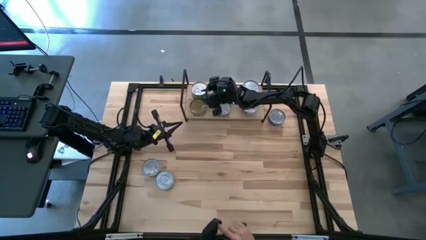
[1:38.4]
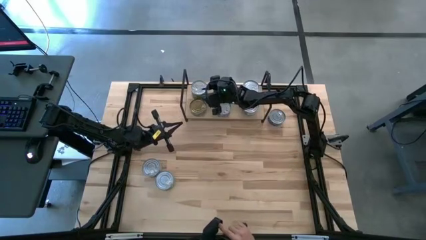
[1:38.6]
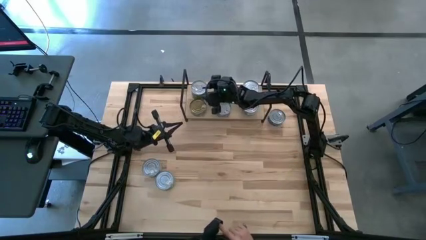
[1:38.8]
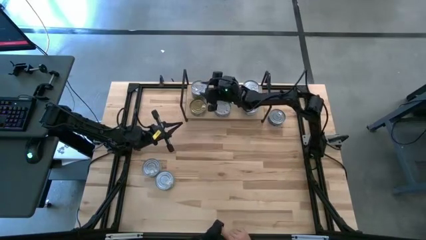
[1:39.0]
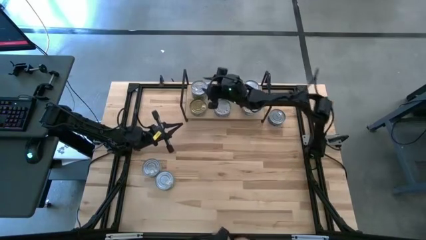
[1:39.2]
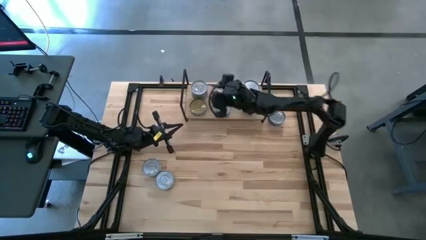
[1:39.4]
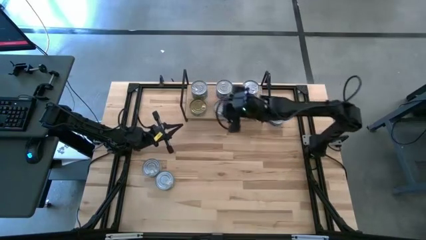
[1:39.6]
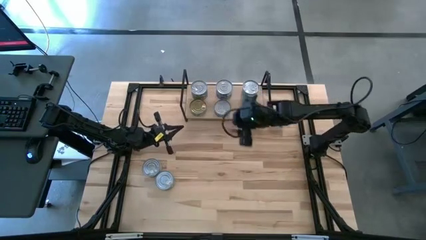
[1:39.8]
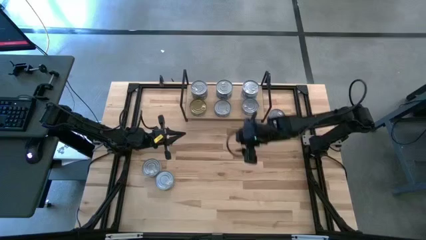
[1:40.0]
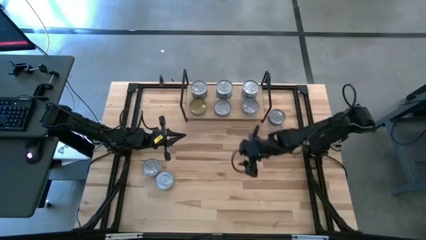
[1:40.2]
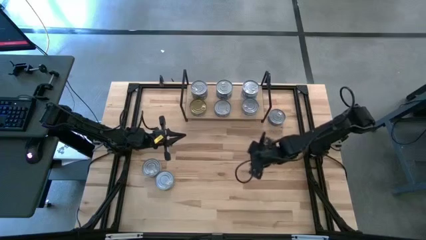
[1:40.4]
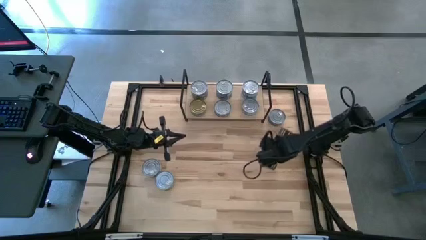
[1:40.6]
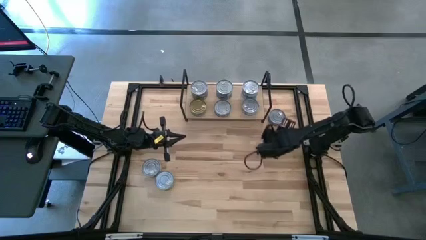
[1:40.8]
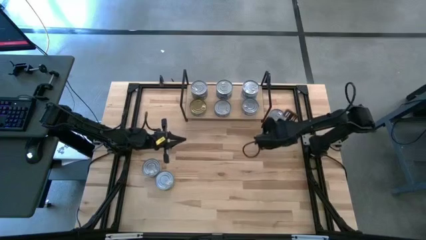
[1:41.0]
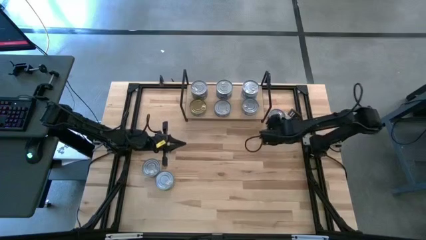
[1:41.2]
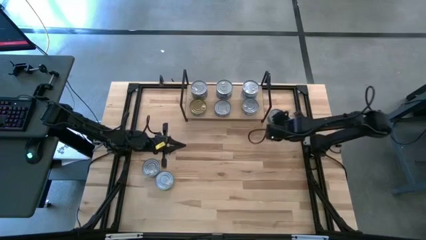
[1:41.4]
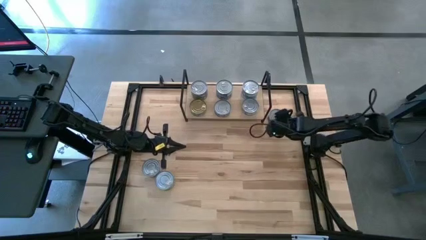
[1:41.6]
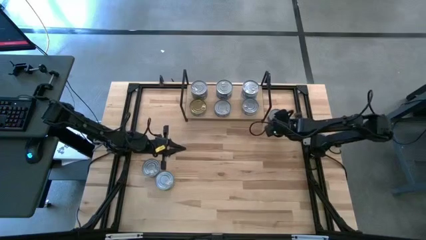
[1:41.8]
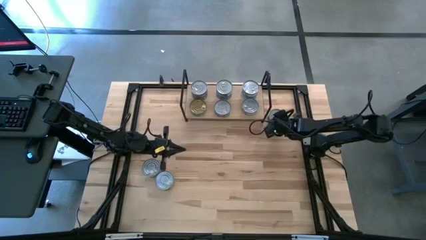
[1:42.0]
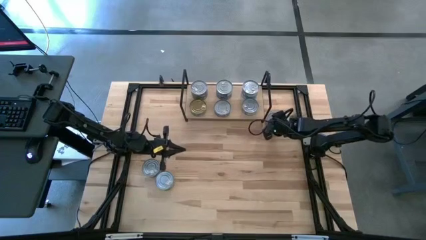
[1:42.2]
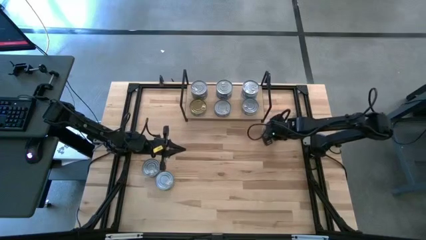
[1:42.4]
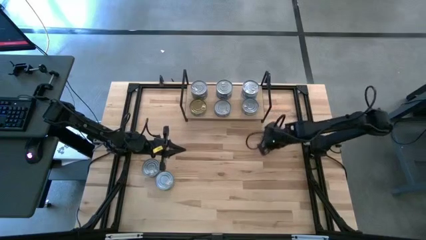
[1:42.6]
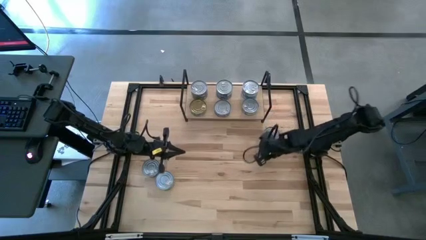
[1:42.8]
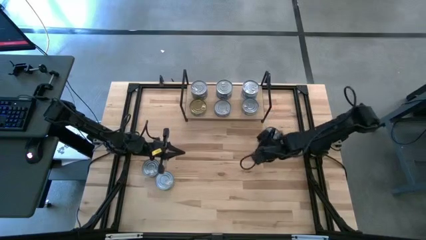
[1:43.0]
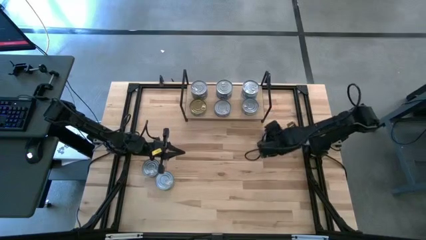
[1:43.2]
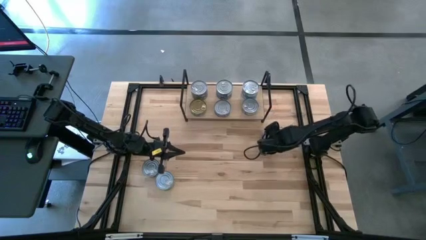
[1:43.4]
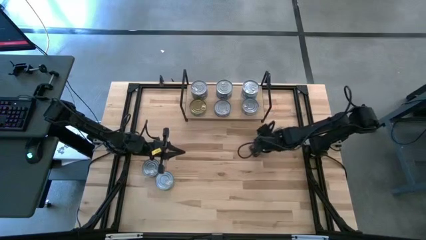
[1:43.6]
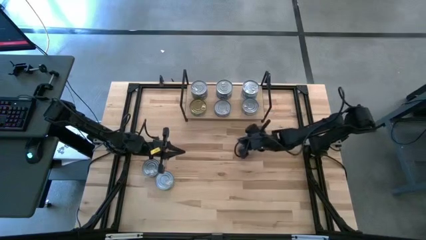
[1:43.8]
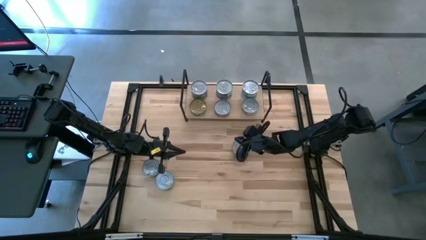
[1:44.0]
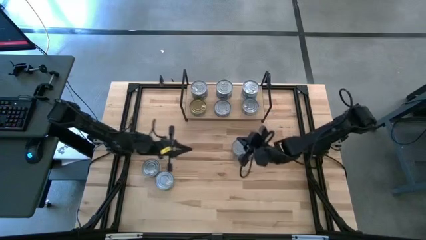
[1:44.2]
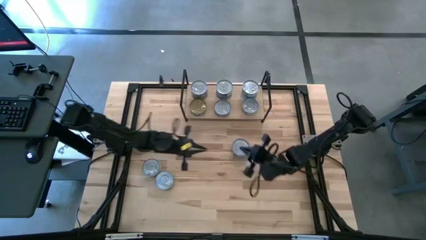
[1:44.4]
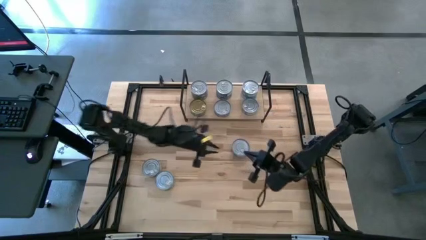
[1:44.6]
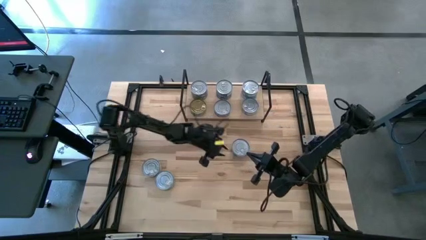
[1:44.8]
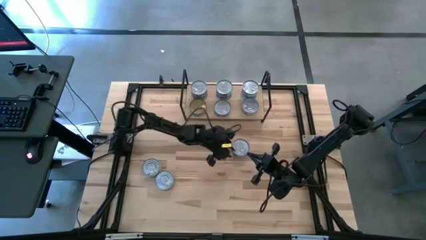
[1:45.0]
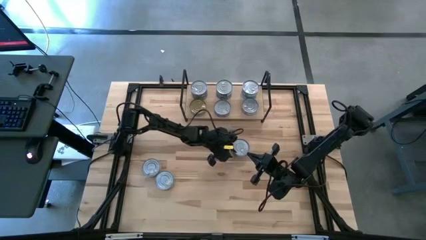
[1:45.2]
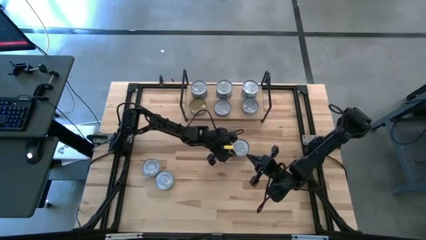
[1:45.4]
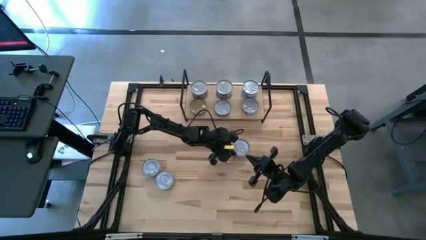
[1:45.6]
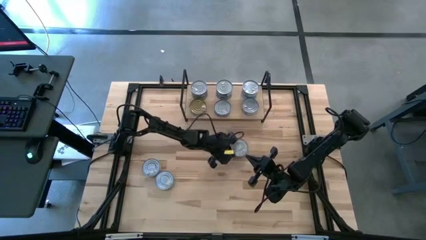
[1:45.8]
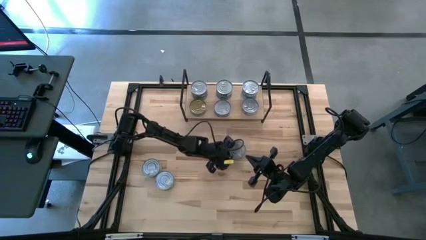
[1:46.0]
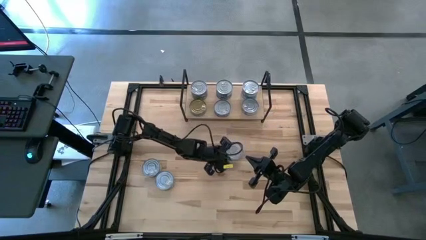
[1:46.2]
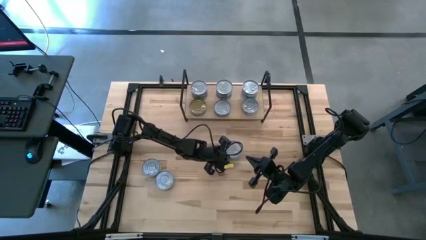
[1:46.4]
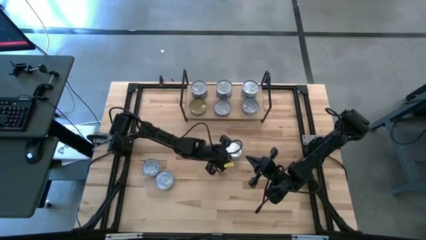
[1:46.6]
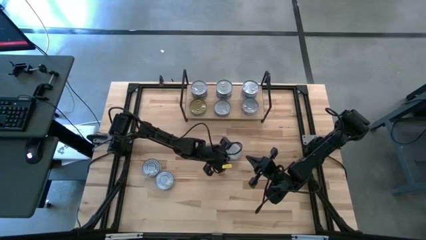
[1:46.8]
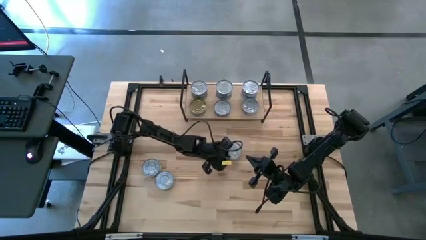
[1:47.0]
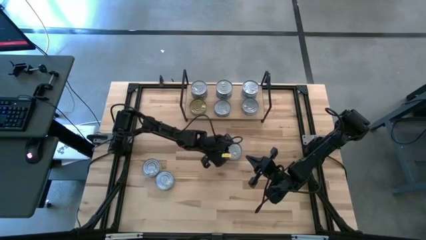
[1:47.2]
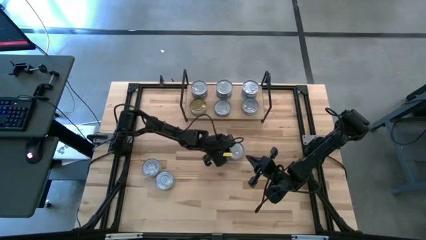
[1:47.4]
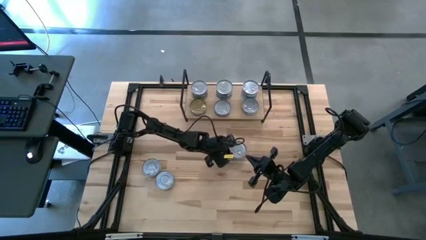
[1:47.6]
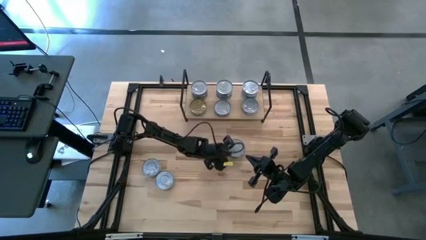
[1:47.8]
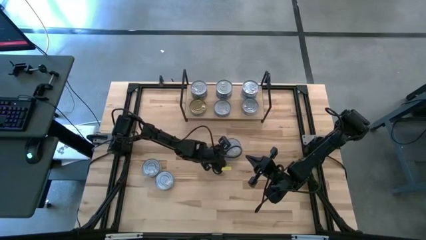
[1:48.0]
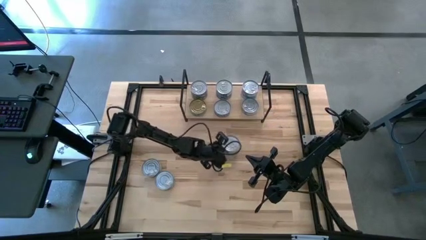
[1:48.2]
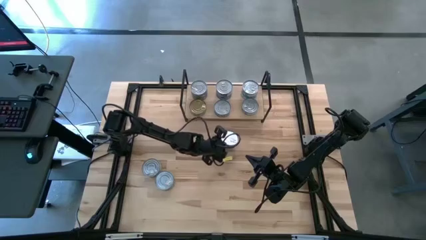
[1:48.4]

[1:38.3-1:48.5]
Task: Stack canned seafood by type on shelf
Stack the blue tuna can on top of the blue tuna can on the shelf

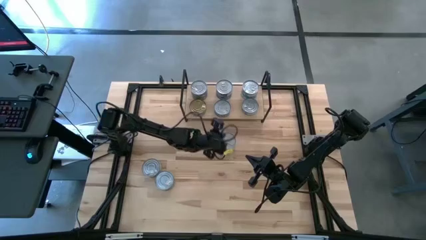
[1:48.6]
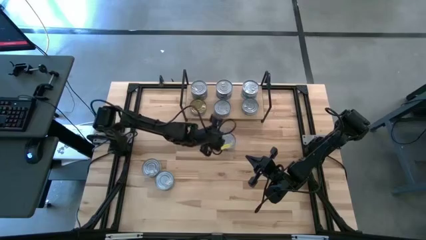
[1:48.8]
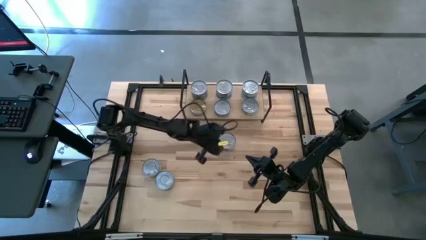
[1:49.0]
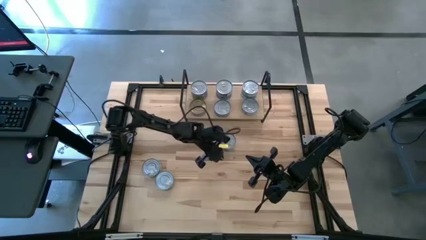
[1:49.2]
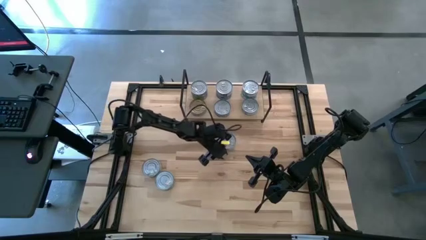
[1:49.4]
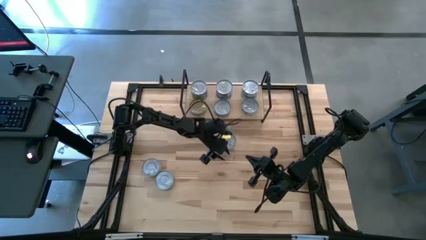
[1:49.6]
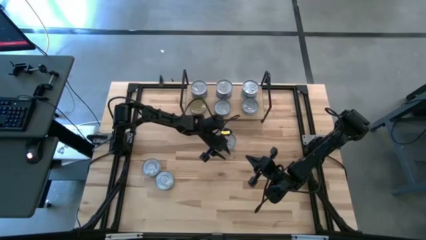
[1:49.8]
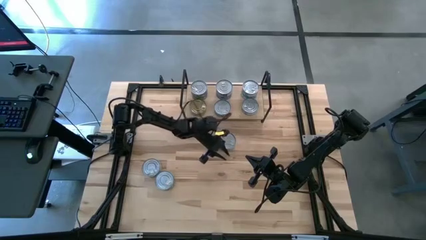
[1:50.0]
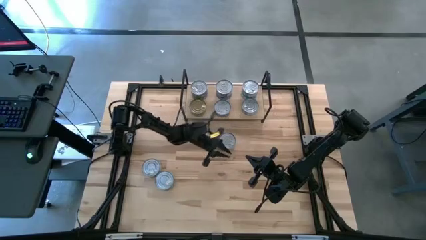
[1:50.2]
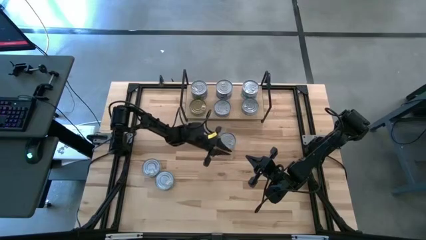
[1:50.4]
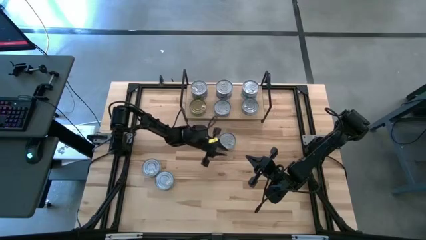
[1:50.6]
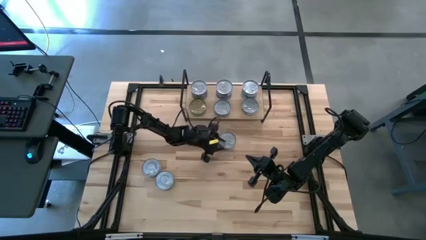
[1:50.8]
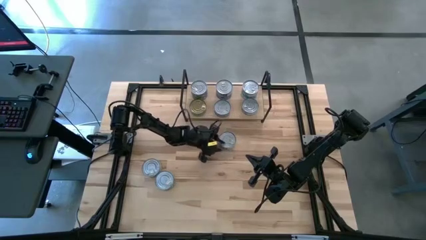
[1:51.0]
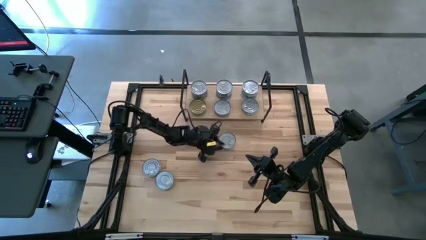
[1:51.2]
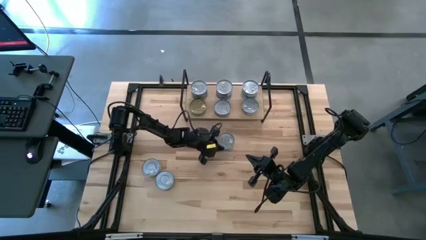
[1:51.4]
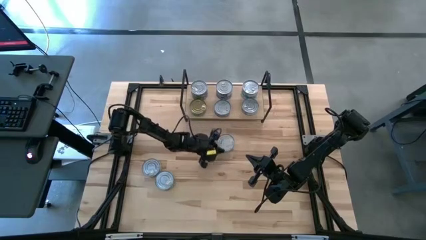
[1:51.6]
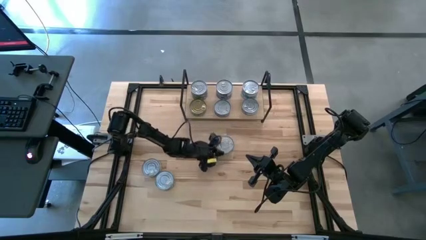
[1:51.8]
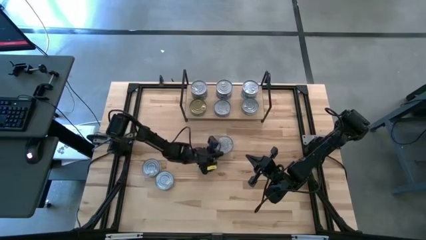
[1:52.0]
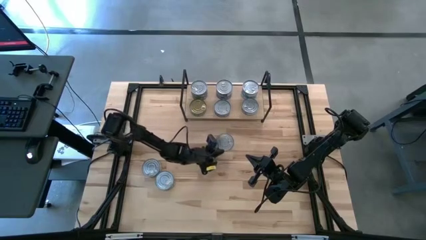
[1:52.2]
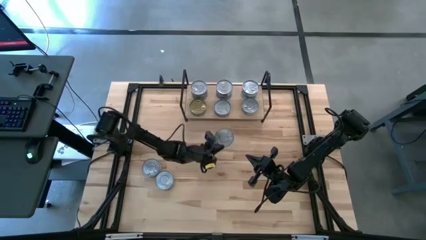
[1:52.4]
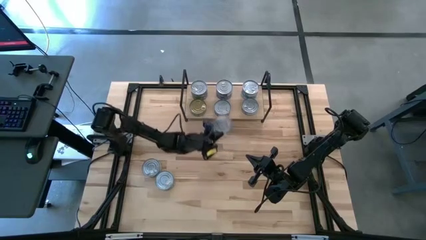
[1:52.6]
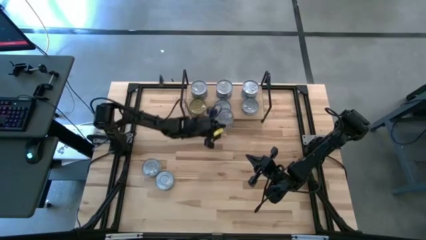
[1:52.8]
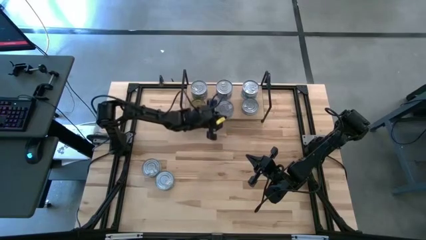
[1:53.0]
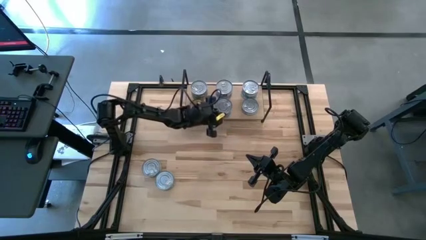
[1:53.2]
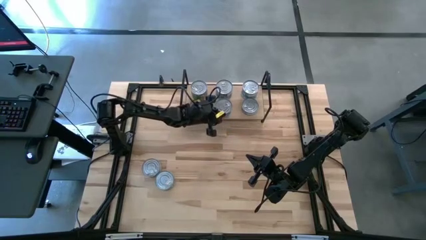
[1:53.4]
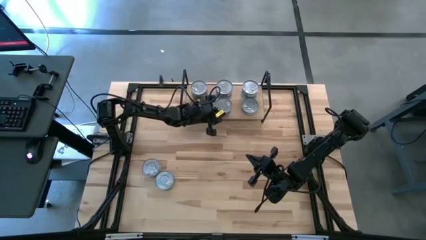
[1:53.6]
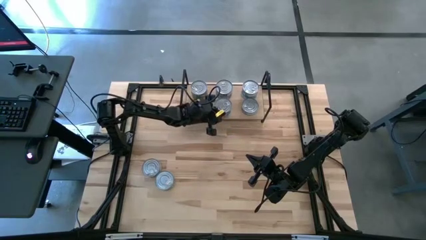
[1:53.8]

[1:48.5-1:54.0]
Stack the blue tuna can on top of the blue tuna can on the shelf

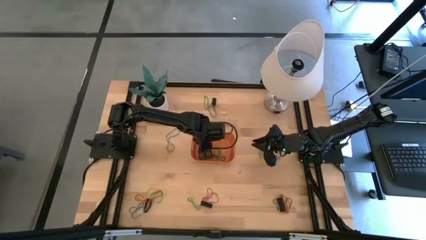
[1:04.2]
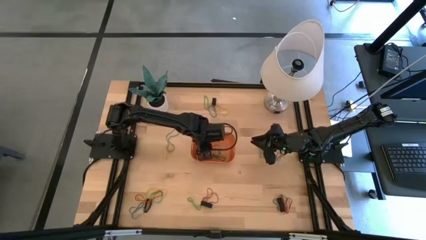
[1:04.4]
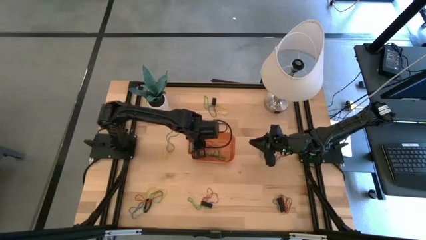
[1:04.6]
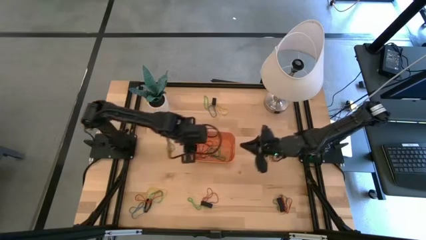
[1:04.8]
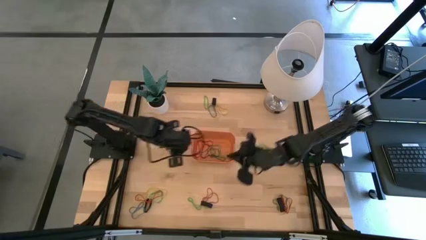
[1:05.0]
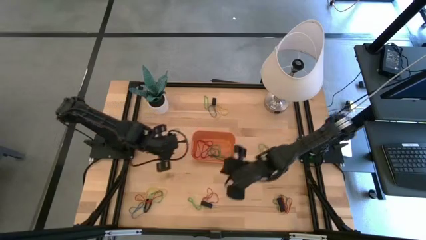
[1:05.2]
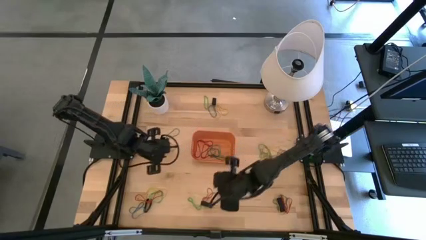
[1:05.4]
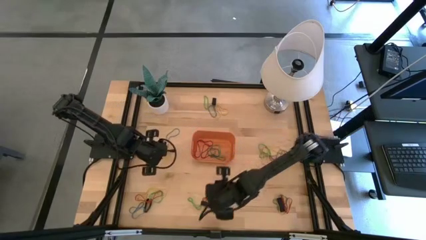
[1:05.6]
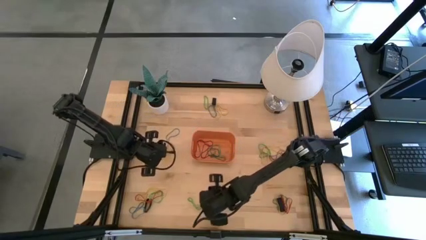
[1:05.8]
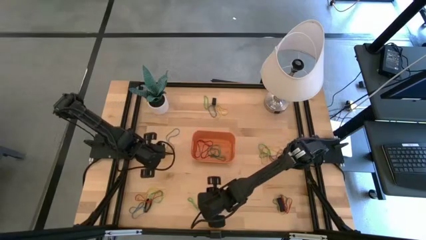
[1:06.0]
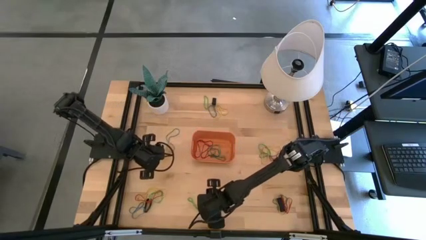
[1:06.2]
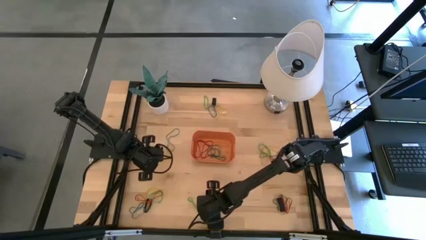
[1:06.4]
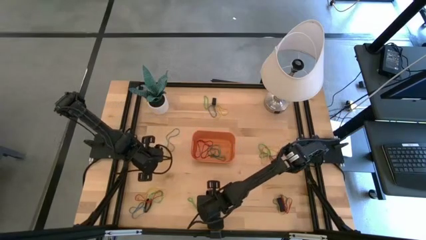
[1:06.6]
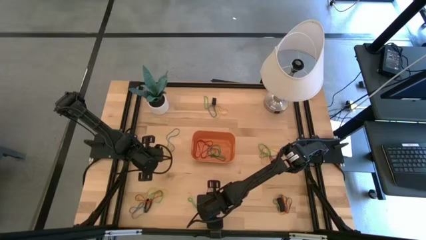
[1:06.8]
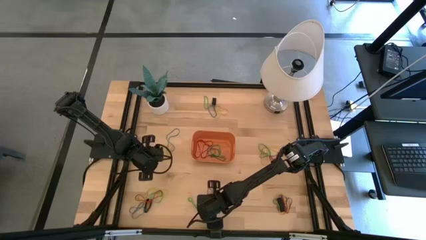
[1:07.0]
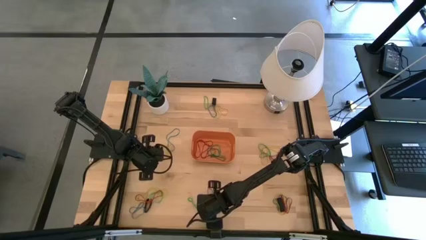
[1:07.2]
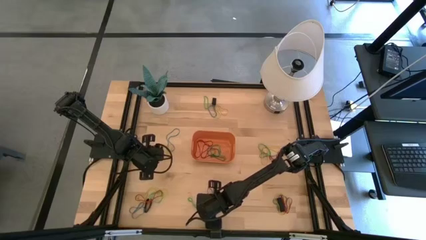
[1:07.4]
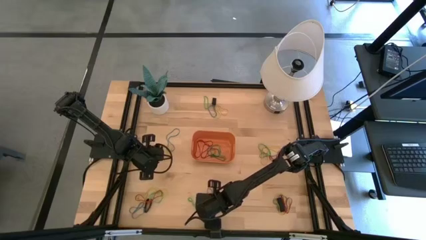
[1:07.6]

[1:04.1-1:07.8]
Task: Pick and place rubber bands into bin
Put the black rubber band into the orange bin
